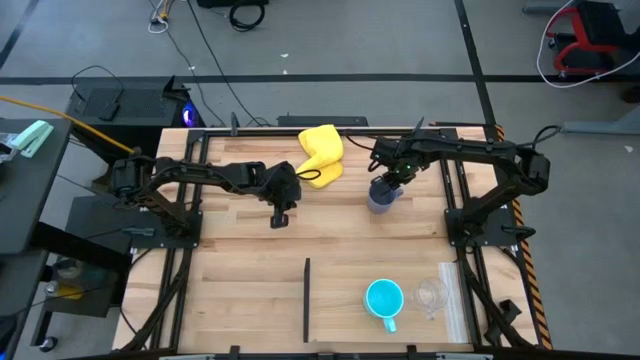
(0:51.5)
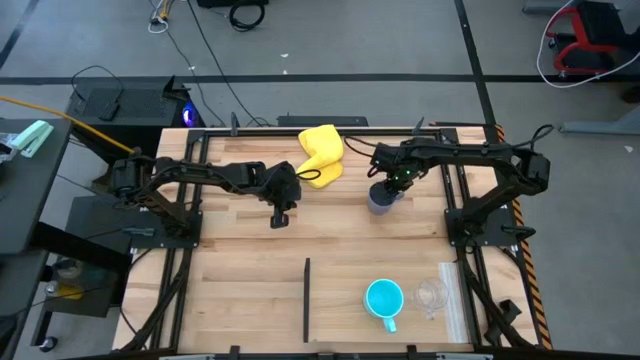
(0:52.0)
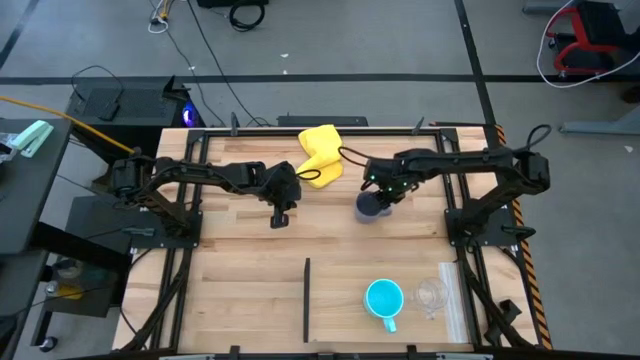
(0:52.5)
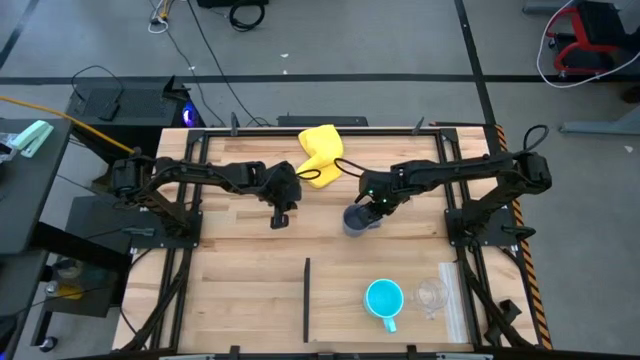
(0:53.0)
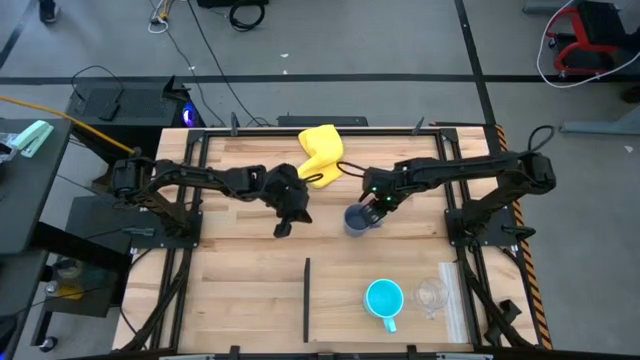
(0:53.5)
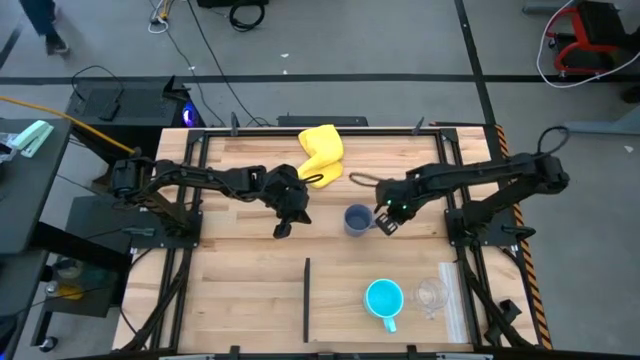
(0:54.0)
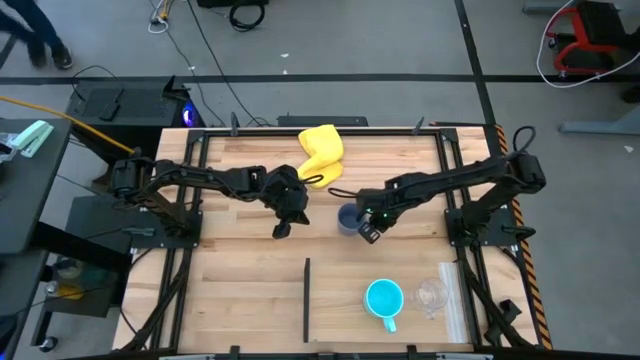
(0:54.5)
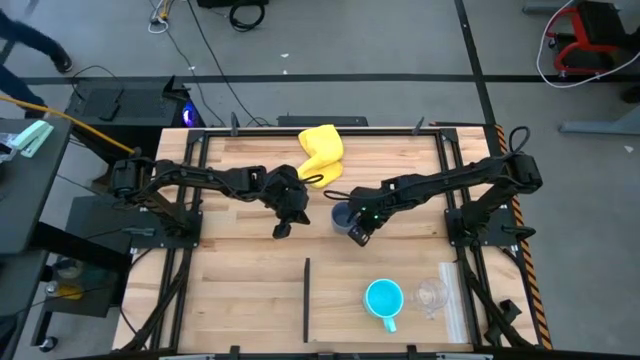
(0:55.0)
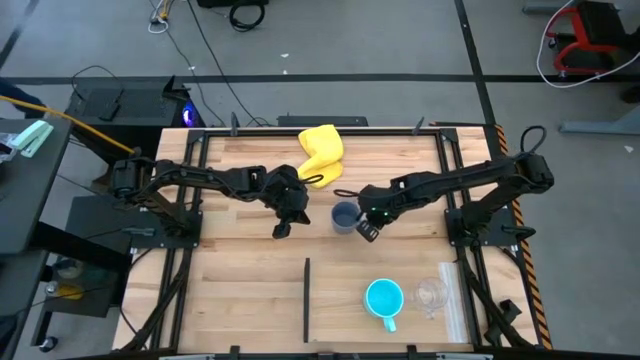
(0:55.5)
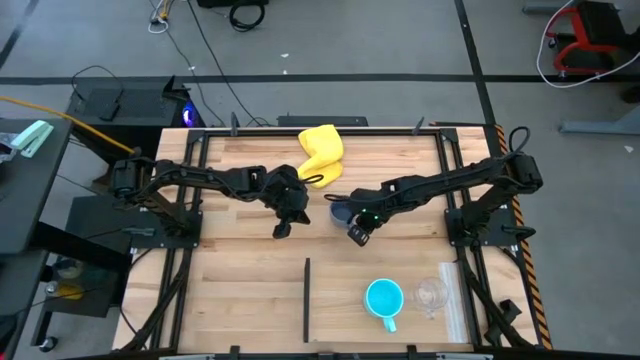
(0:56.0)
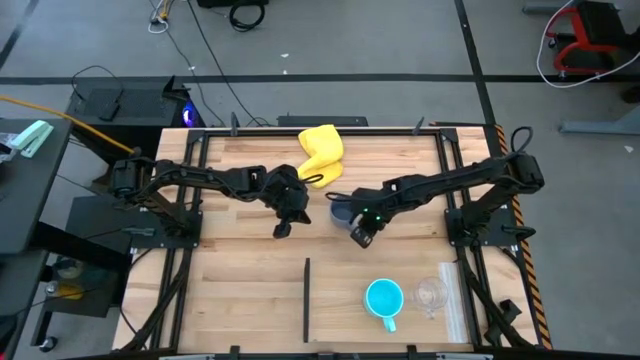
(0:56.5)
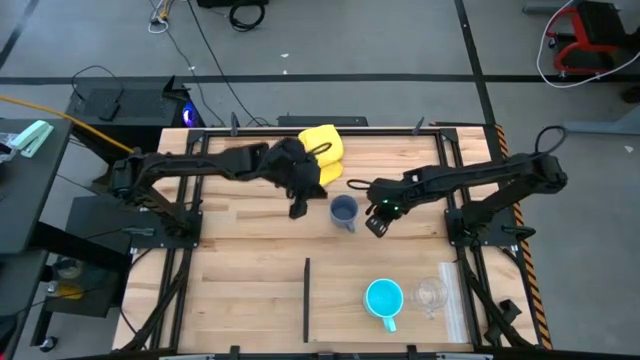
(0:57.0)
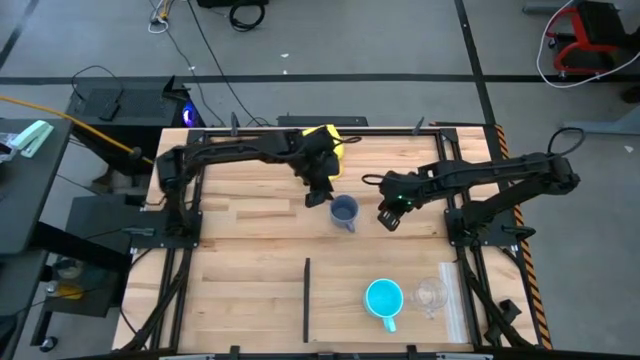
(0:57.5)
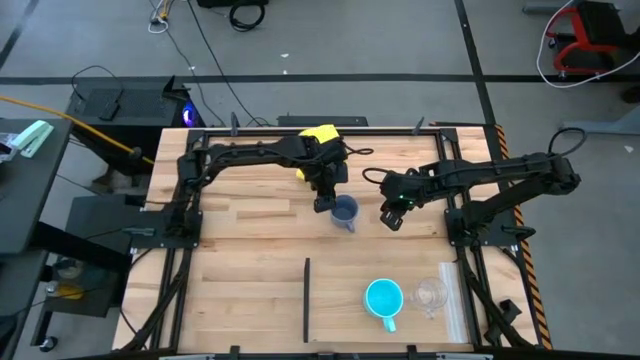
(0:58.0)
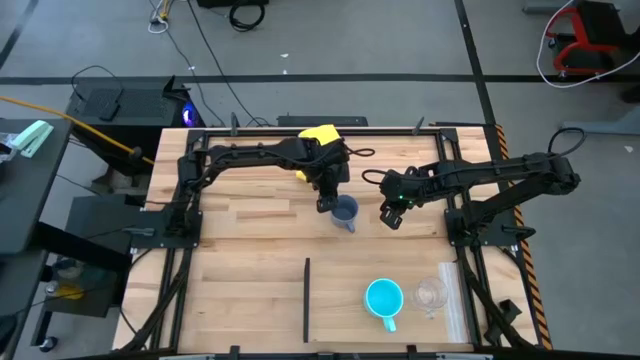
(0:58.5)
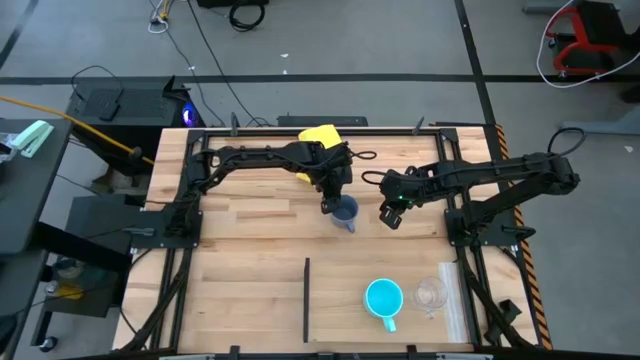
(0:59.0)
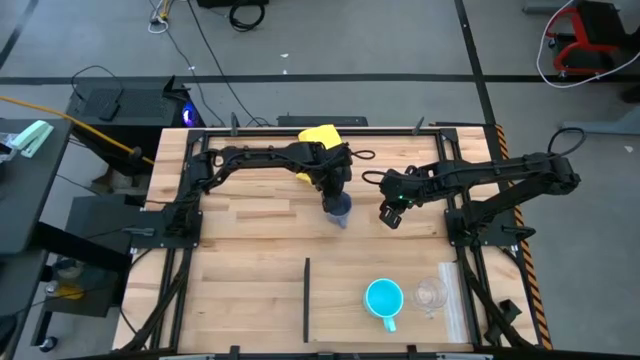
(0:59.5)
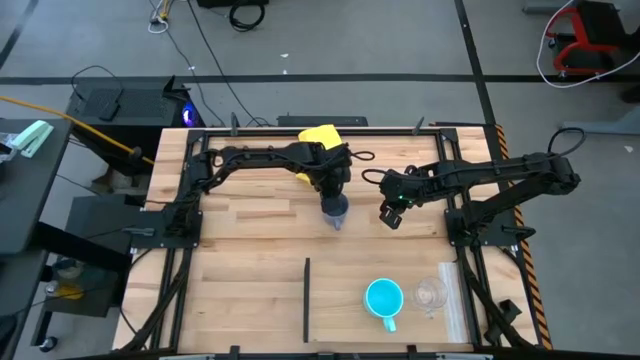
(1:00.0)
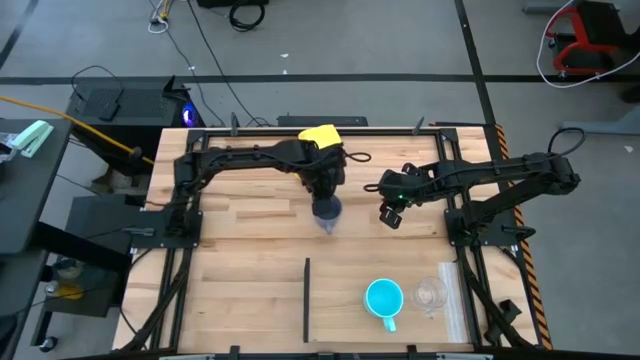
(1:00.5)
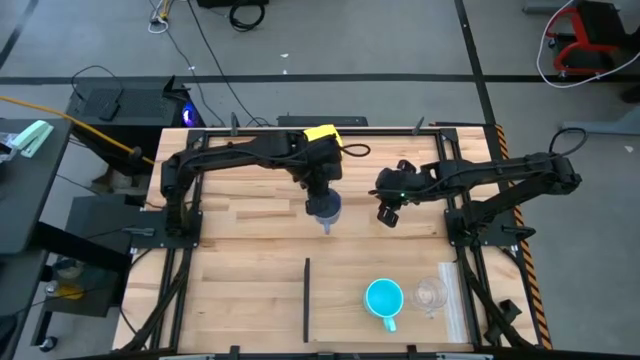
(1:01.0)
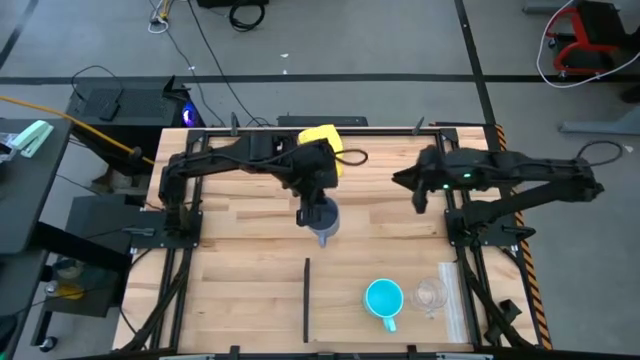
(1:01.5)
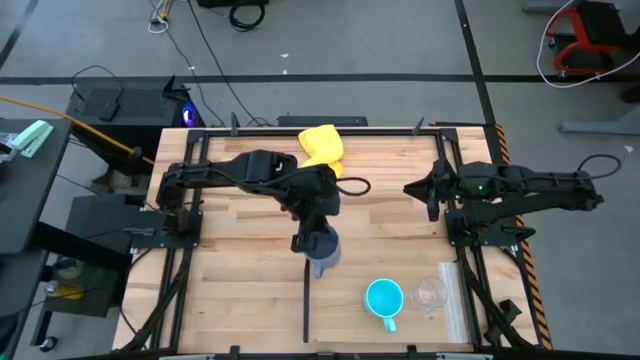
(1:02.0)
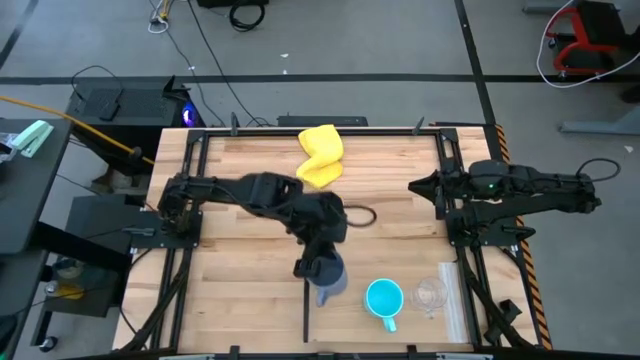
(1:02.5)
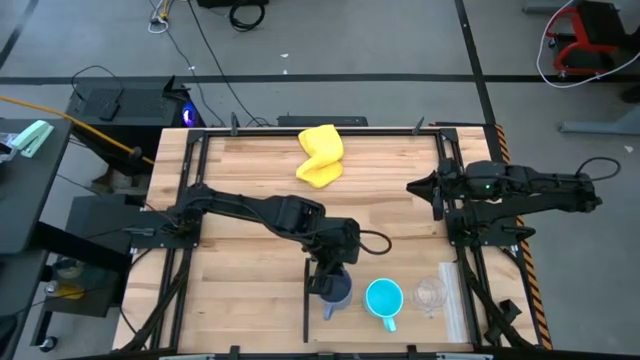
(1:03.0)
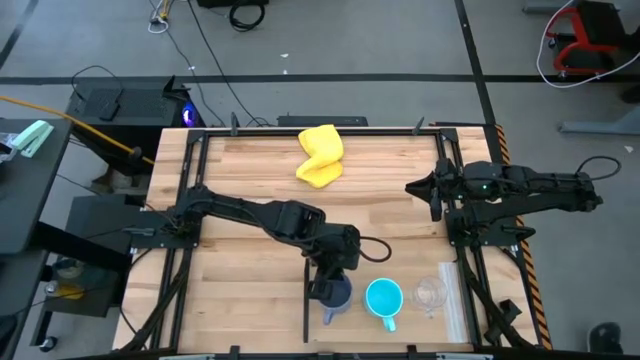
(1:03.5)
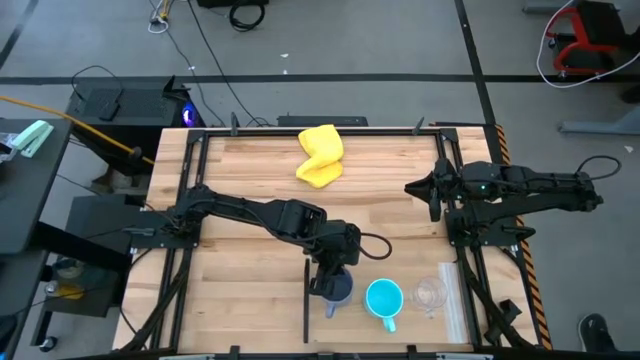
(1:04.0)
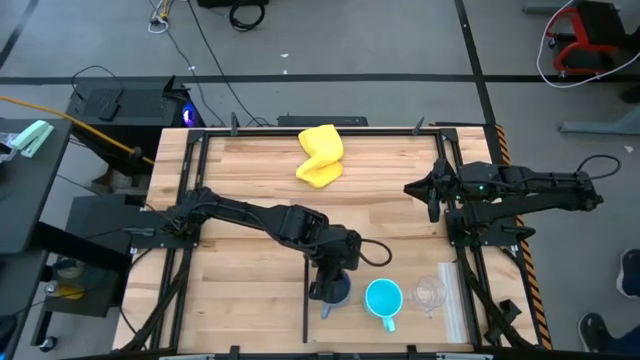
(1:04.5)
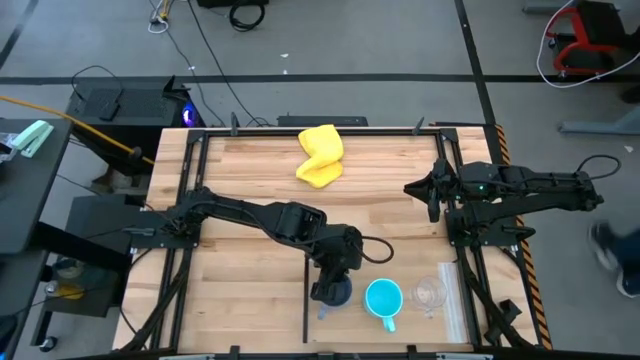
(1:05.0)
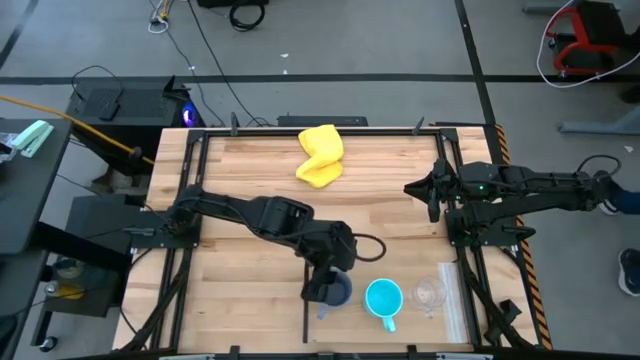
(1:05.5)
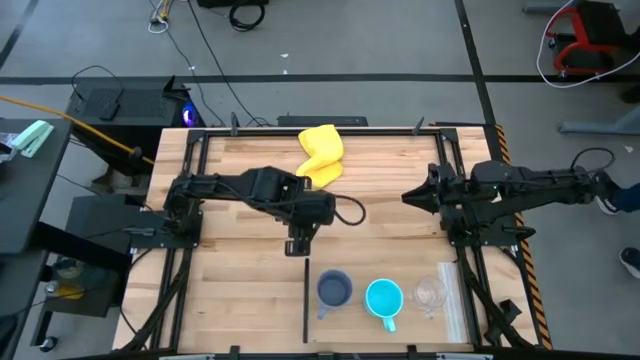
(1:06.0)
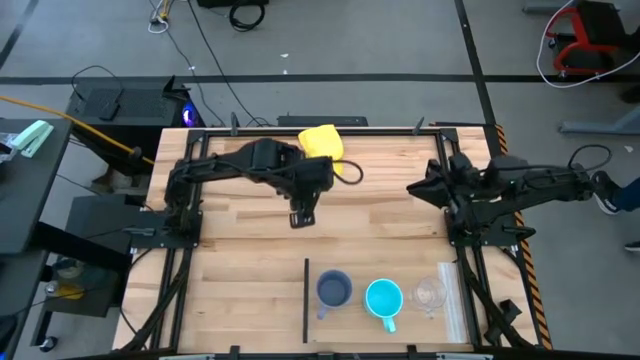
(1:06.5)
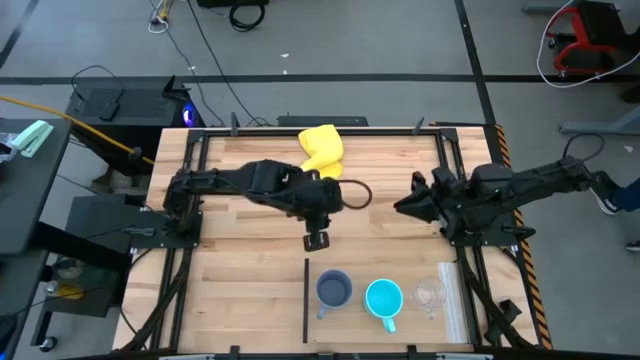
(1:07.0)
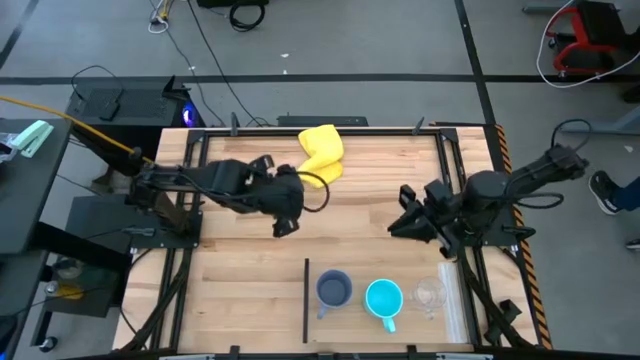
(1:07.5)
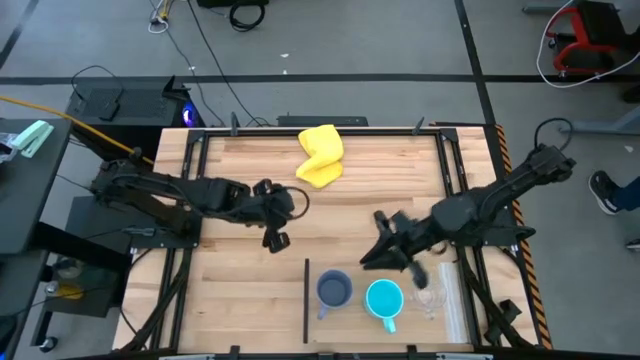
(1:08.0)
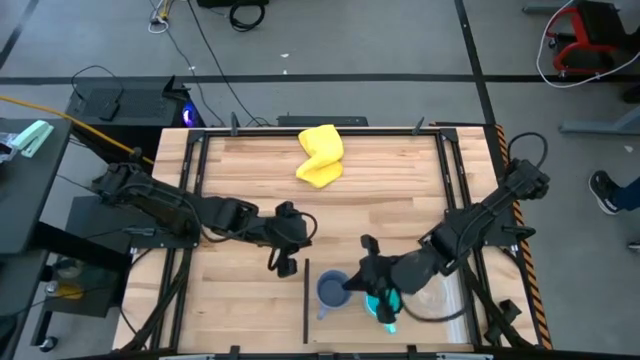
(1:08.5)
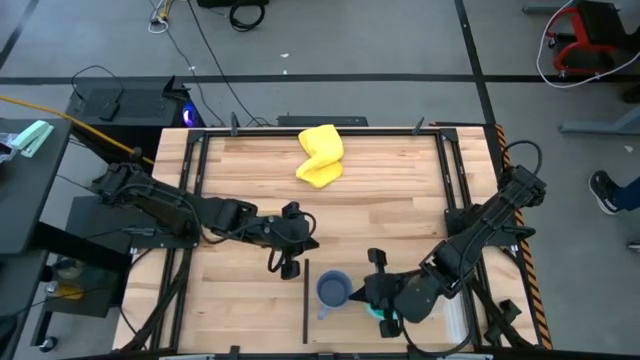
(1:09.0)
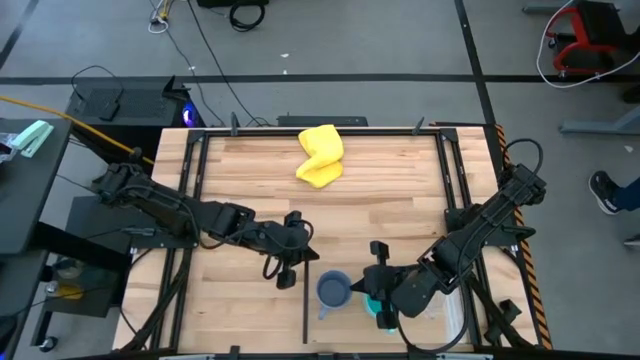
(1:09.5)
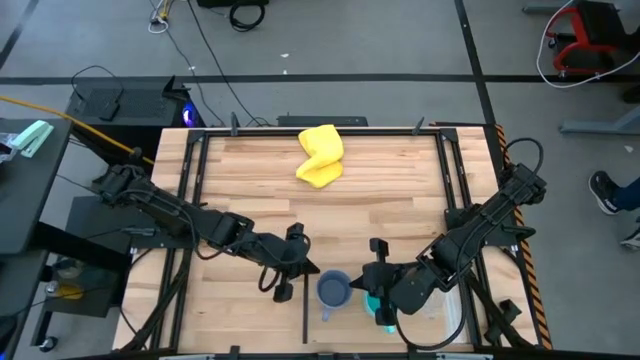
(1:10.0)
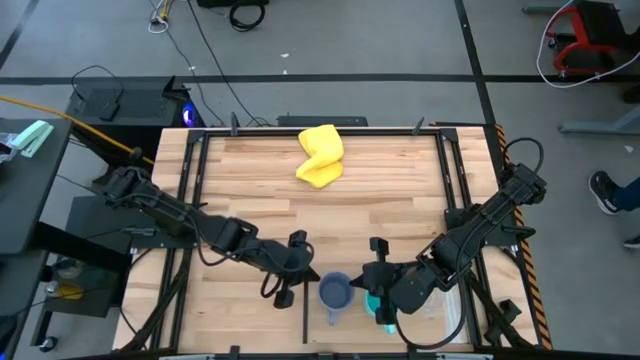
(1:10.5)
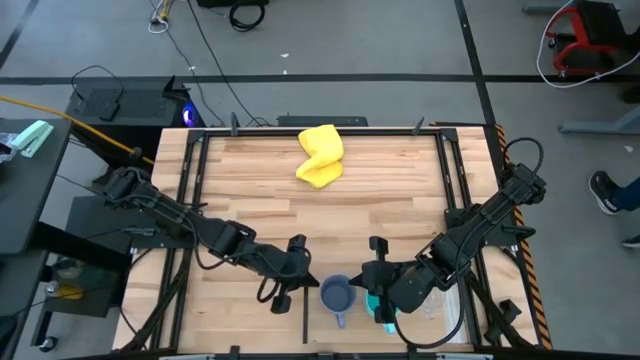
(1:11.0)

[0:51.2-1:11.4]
Task: Stack small to large cups/mugs on shelf
Put the violet mug on the shelf

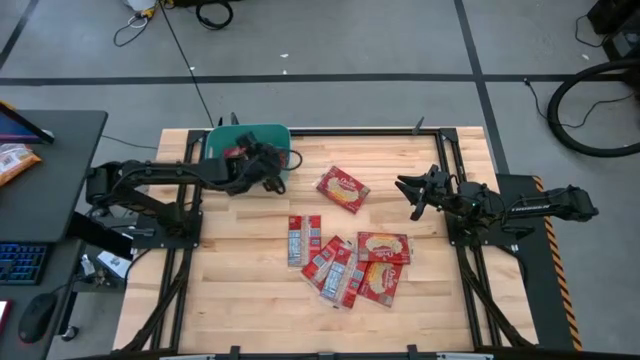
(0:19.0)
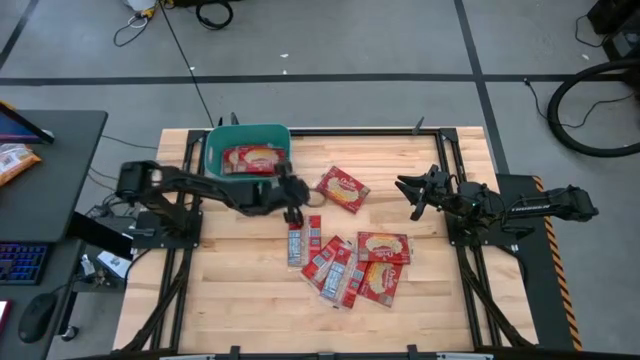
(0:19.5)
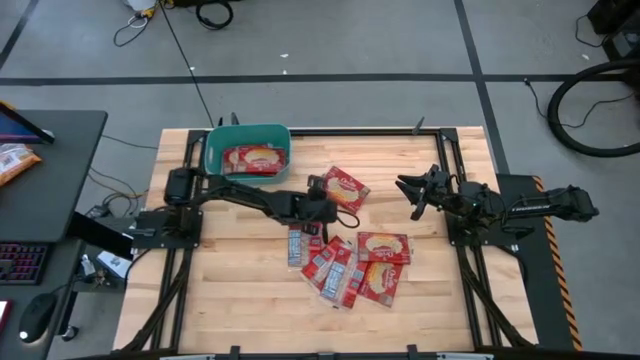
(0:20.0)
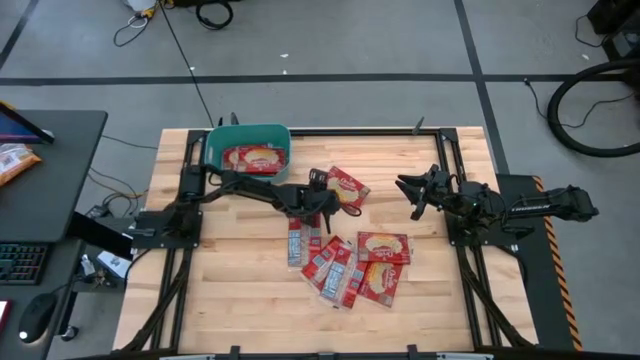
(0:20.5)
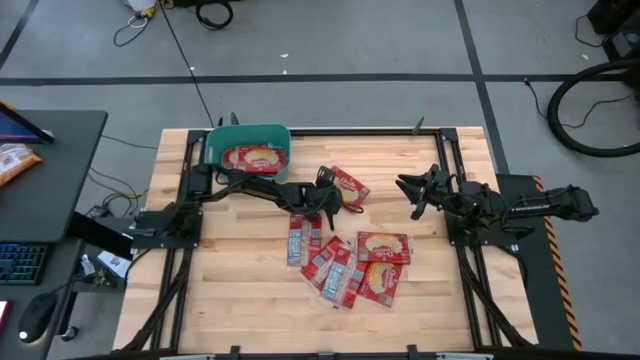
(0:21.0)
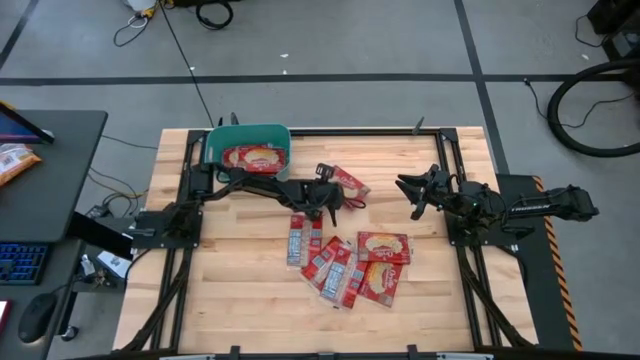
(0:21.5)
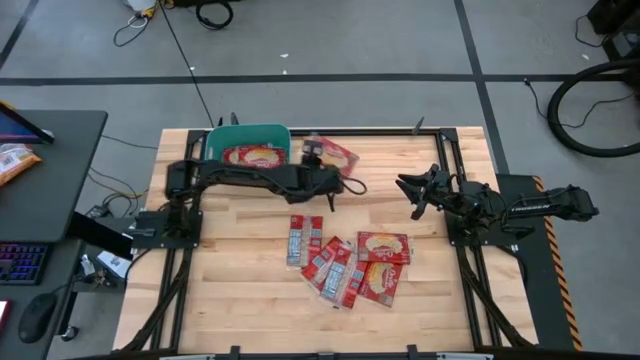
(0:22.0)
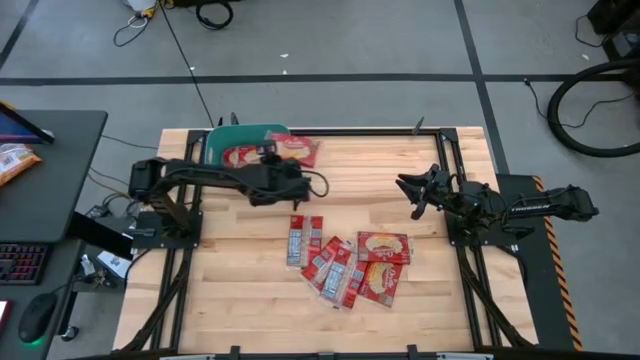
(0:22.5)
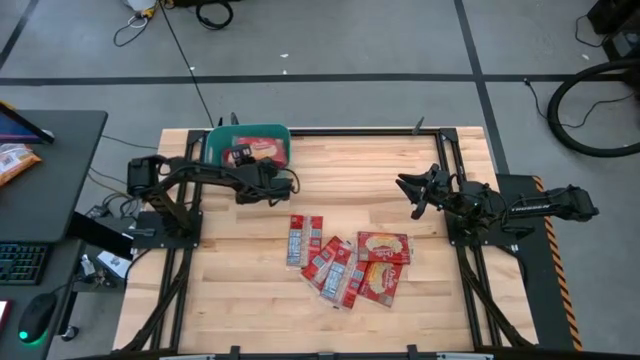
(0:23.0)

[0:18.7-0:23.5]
Task: Sort popcorn bags into baskets
Put the red popcorn bag into the blue bin
